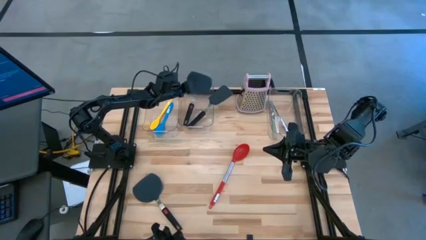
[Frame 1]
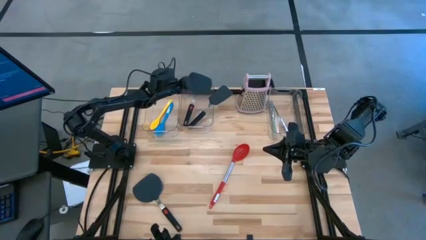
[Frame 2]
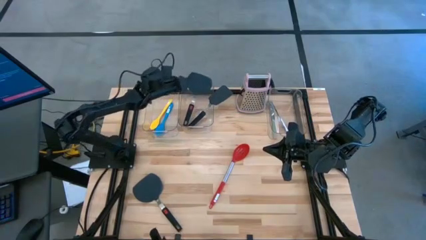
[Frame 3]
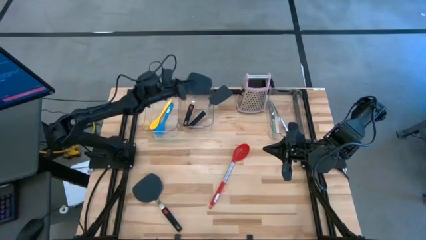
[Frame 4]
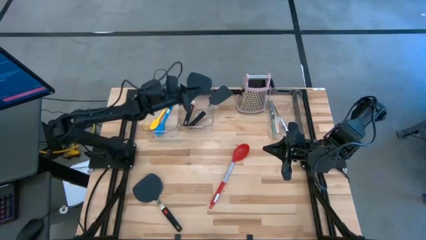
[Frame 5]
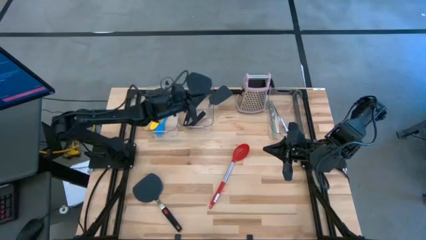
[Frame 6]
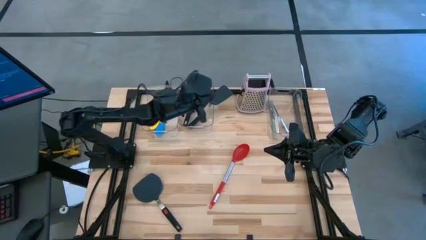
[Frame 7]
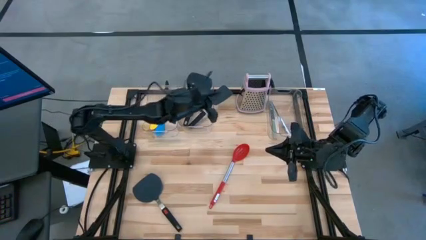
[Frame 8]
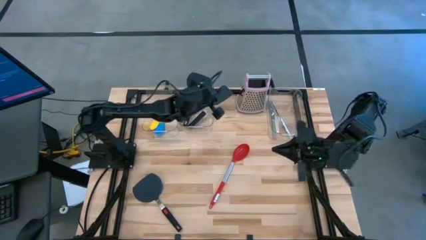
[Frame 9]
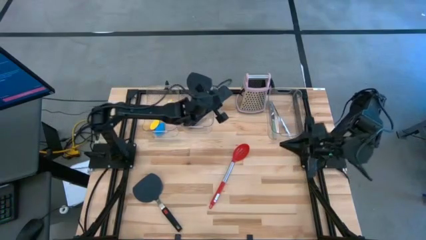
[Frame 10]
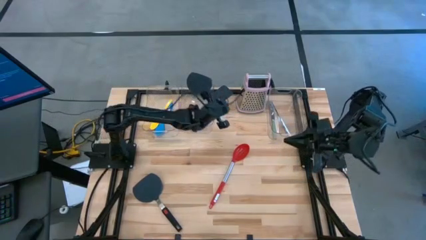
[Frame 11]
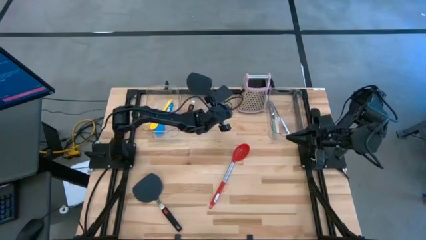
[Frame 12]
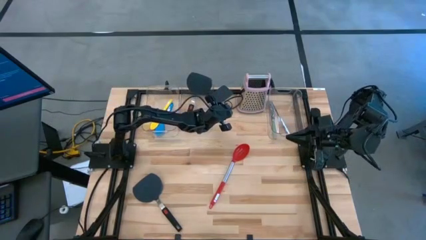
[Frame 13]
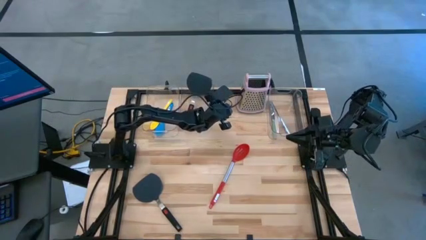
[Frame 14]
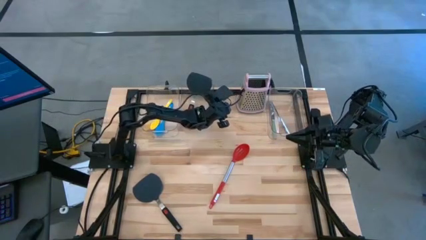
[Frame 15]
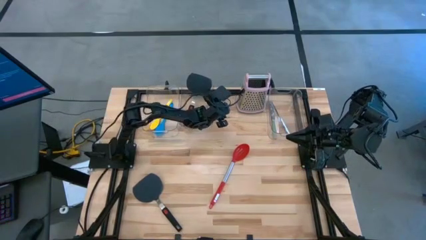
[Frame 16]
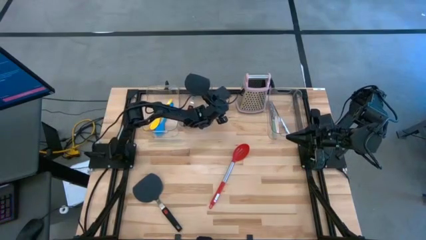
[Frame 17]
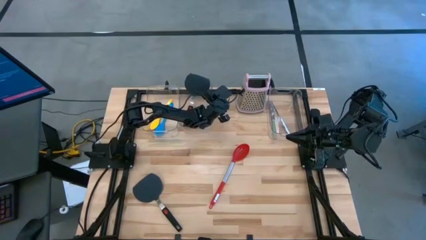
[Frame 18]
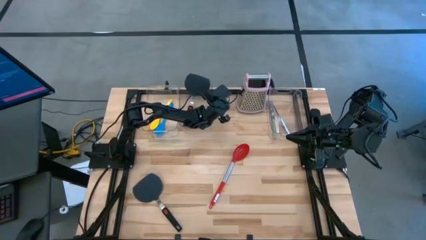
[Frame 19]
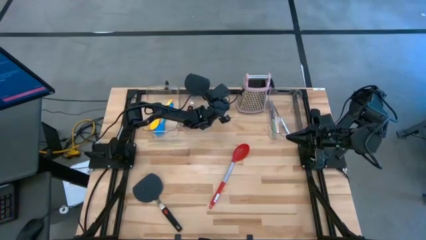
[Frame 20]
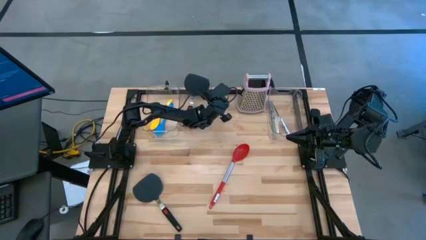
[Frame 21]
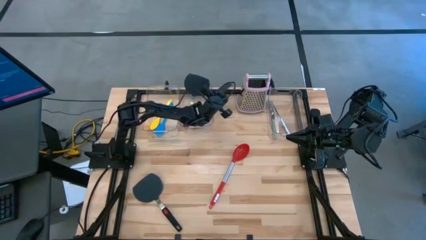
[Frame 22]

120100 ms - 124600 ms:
Task: Pick & Place Kitchen Items
Adjust the black spatula in the middle transparent bin

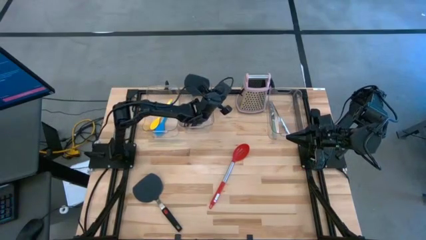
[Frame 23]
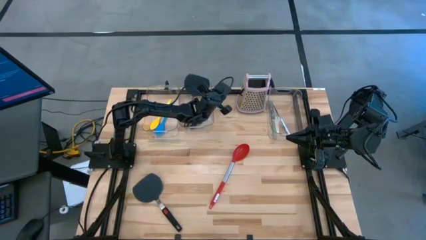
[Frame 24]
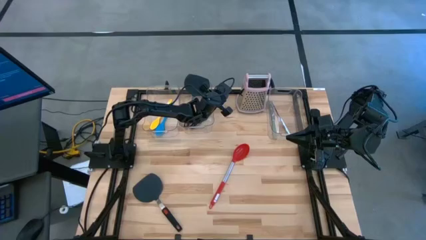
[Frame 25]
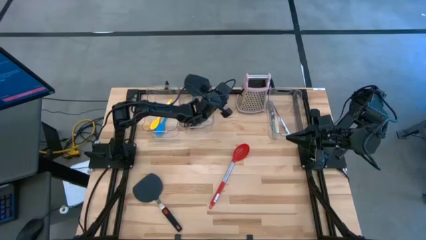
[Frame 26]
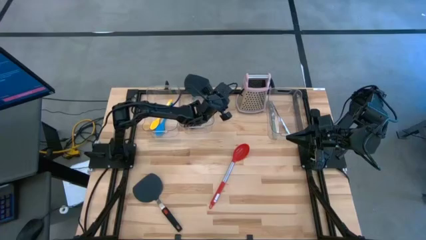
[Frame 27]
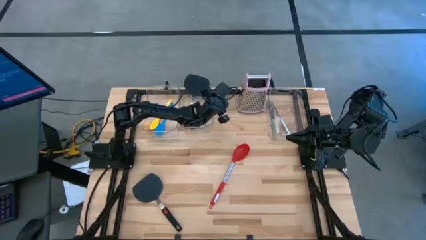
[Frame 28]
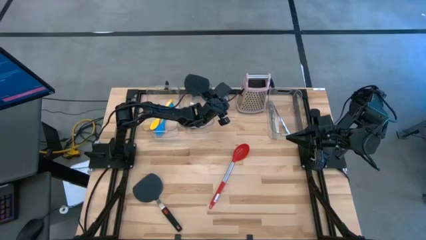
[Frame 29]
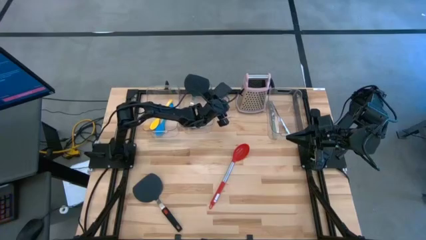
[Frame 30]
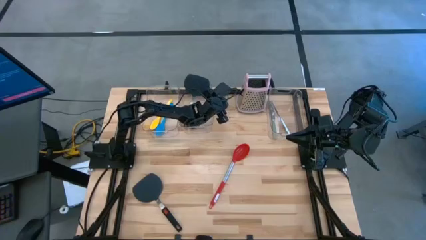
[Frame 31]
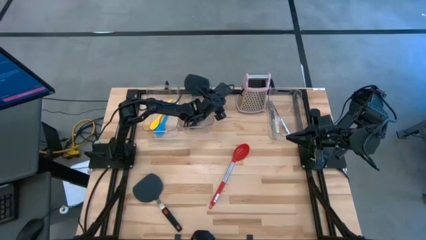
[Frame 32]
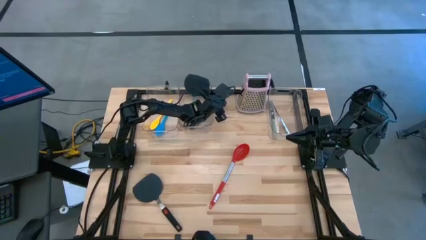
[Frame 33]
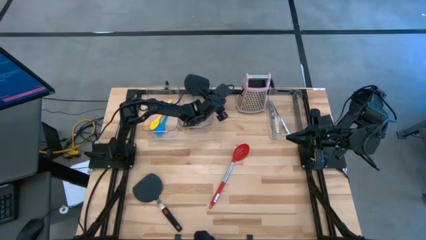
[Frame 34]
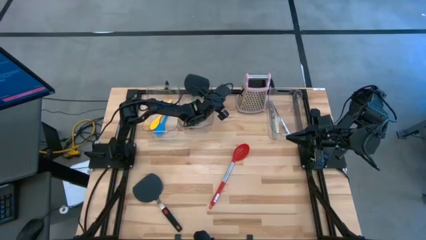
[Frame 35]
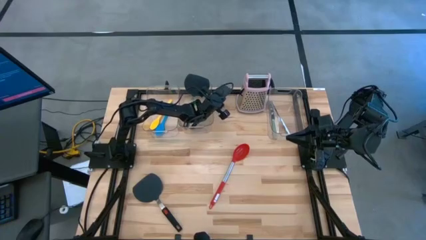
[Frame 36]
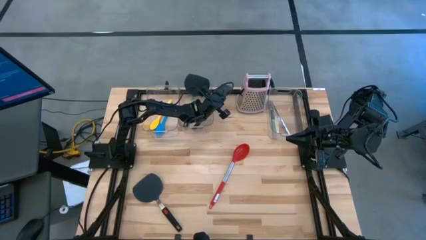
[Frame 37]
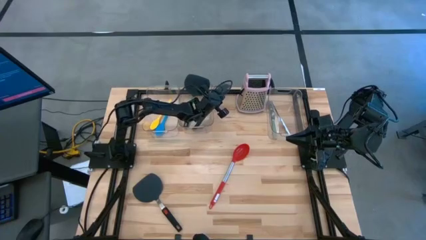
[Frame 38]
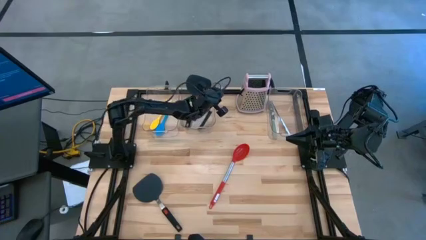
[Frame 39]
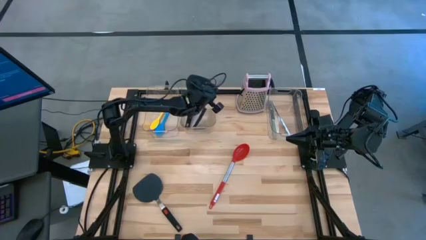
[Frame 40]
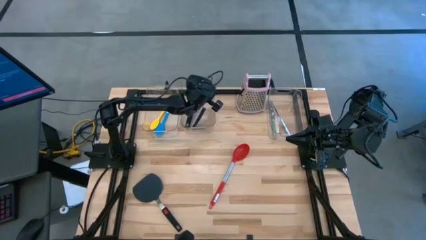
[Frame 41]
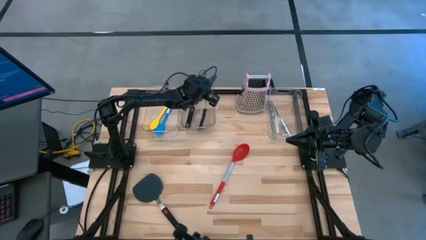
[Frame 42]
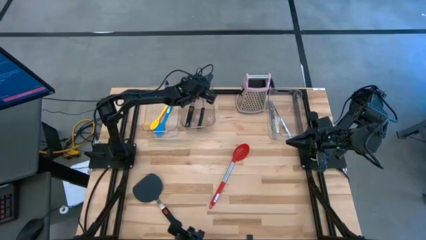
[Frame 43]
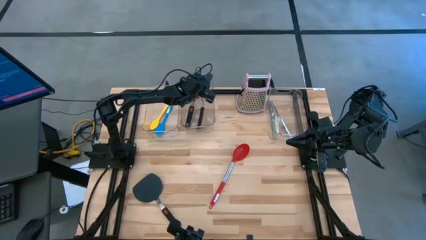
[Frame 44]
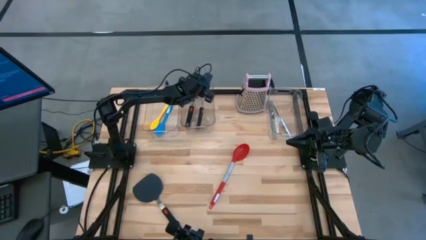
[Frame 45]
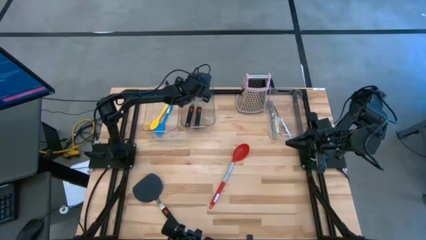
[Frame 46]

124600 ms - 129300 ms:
Adjust the black spatula in the middle transparent bin

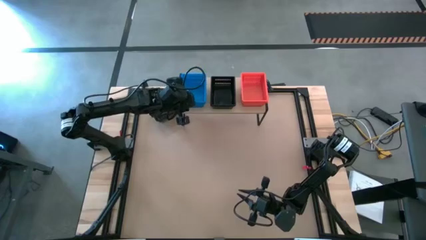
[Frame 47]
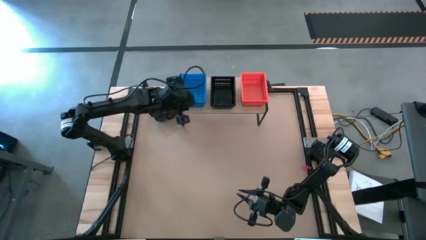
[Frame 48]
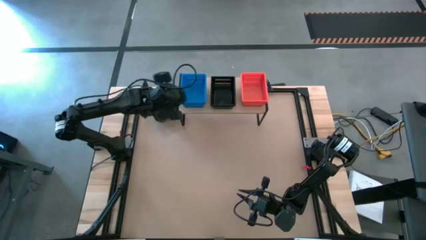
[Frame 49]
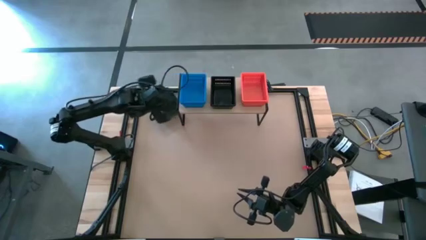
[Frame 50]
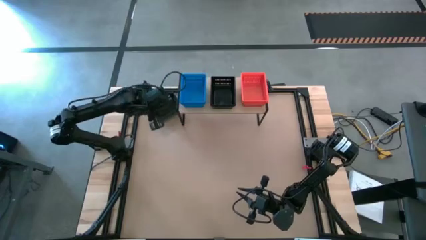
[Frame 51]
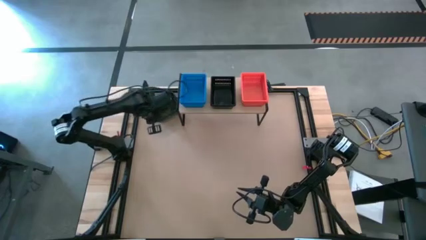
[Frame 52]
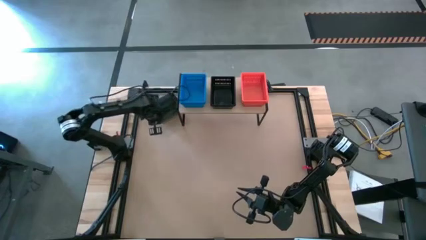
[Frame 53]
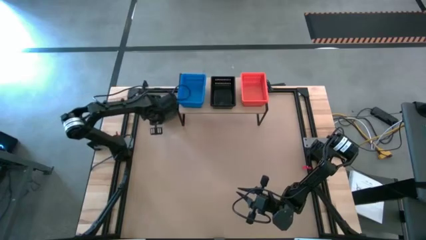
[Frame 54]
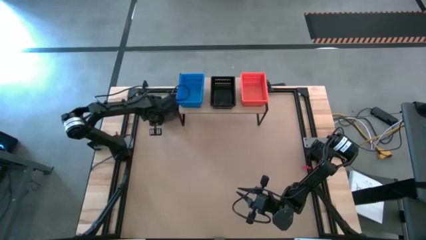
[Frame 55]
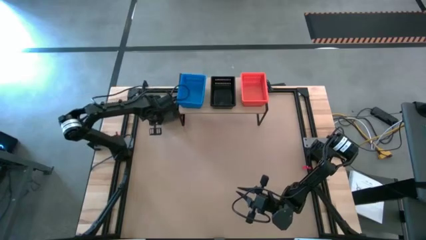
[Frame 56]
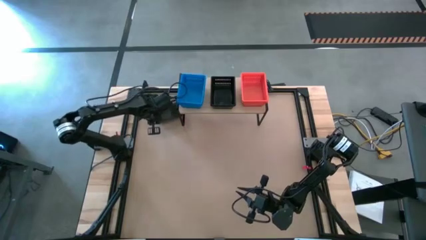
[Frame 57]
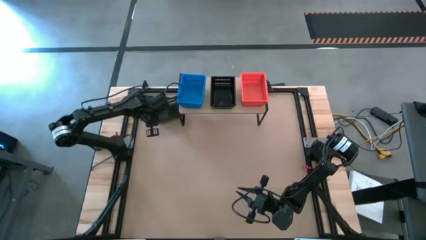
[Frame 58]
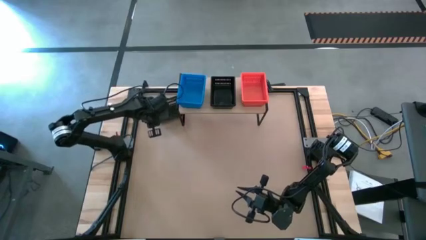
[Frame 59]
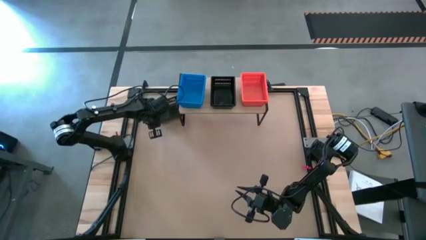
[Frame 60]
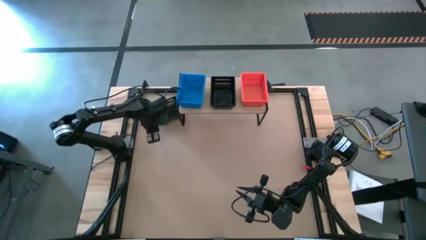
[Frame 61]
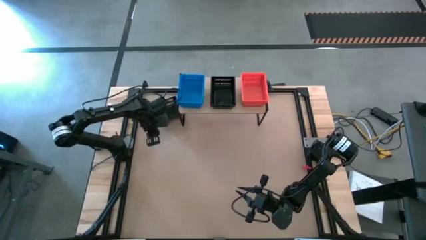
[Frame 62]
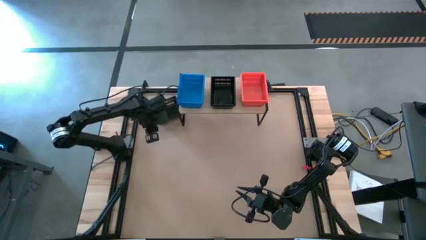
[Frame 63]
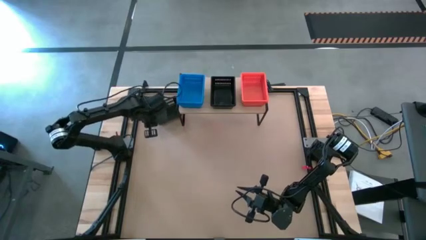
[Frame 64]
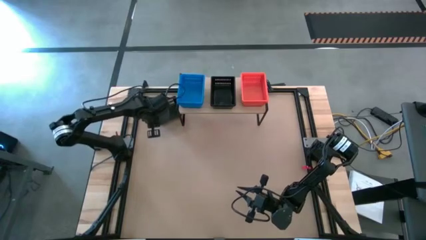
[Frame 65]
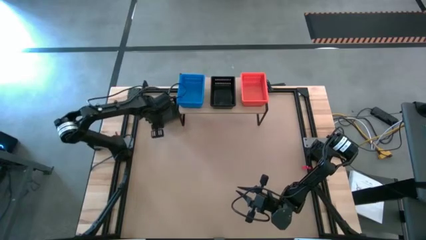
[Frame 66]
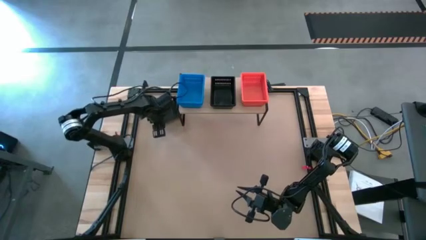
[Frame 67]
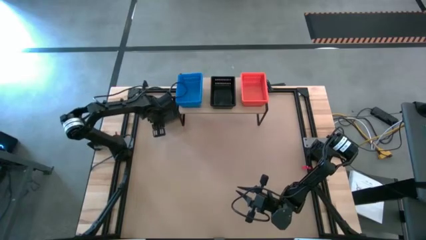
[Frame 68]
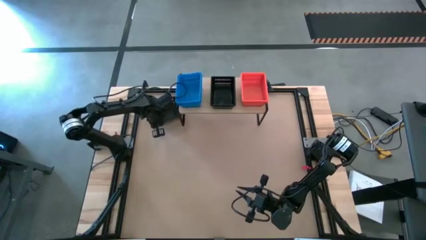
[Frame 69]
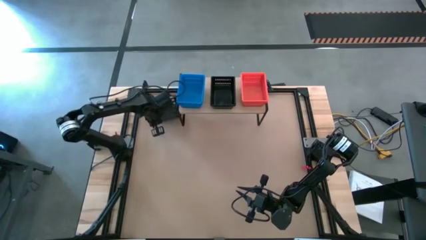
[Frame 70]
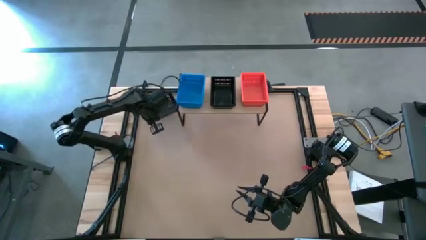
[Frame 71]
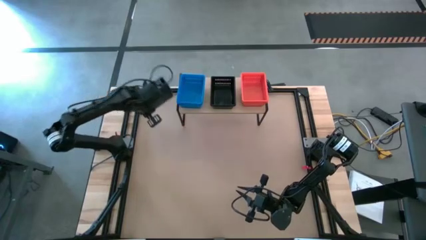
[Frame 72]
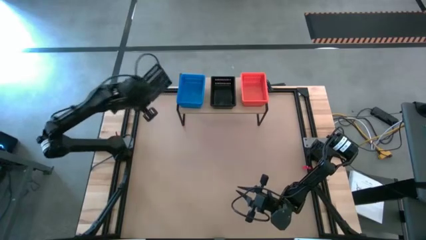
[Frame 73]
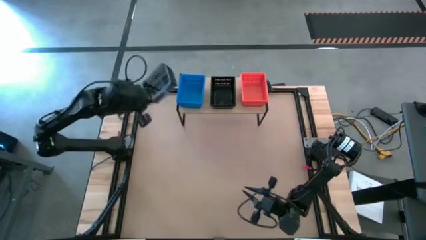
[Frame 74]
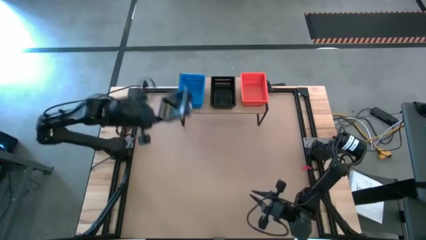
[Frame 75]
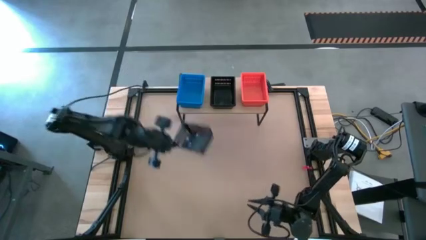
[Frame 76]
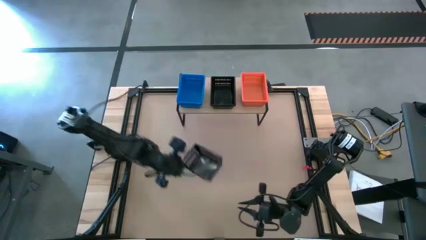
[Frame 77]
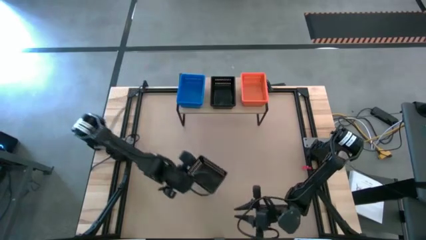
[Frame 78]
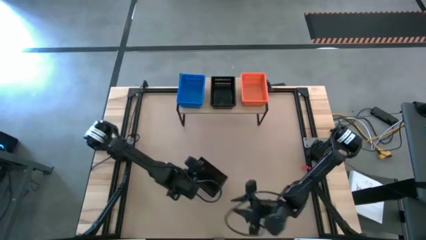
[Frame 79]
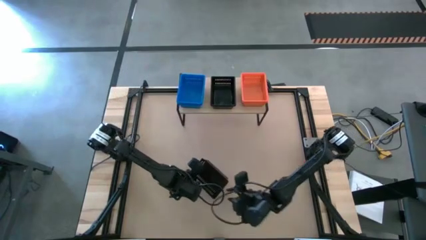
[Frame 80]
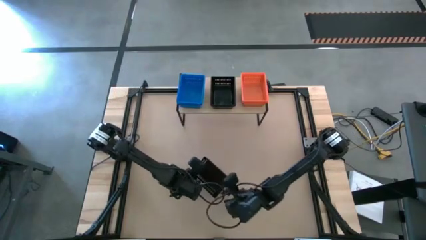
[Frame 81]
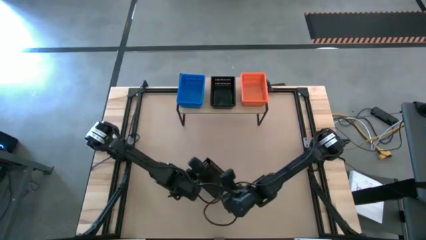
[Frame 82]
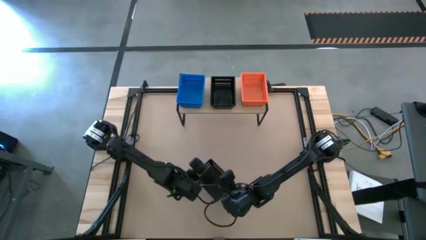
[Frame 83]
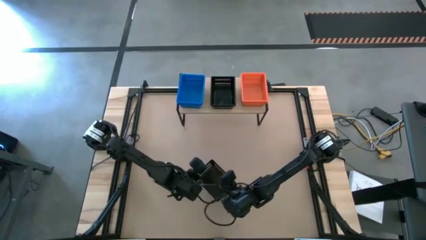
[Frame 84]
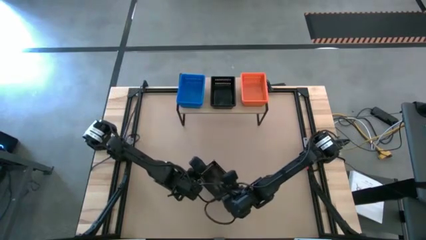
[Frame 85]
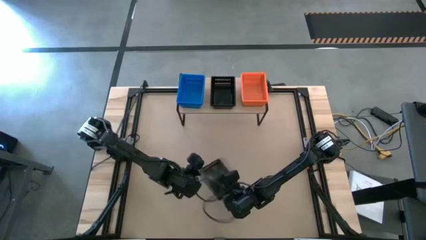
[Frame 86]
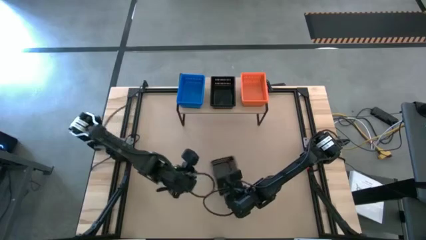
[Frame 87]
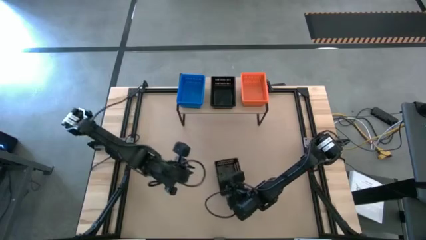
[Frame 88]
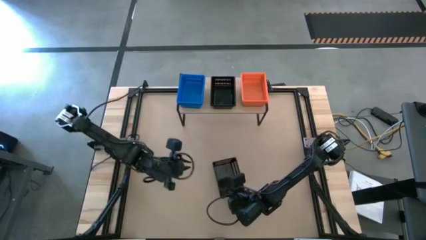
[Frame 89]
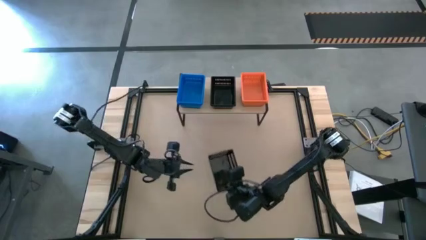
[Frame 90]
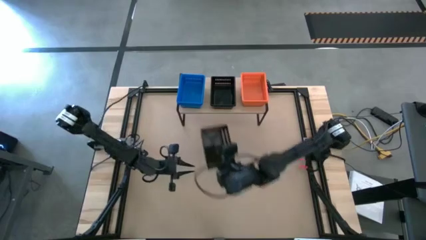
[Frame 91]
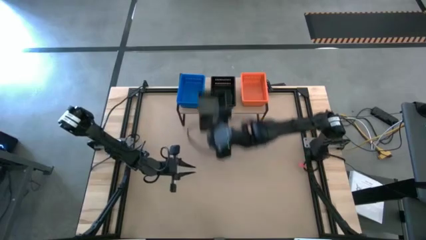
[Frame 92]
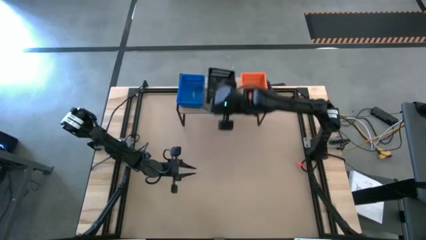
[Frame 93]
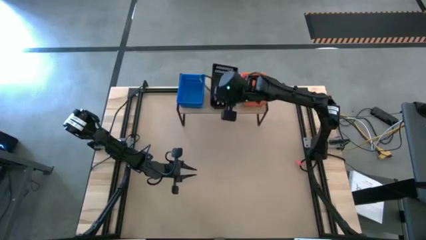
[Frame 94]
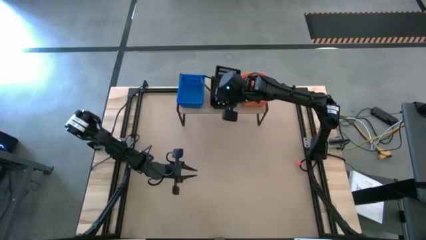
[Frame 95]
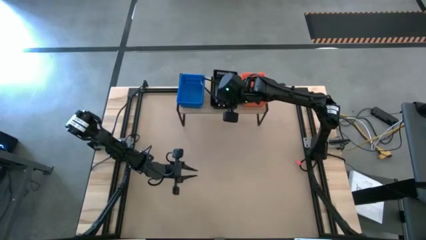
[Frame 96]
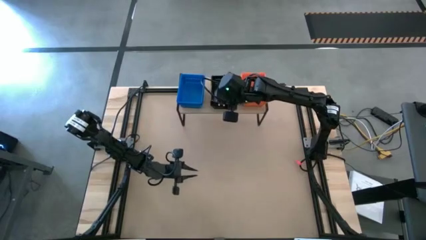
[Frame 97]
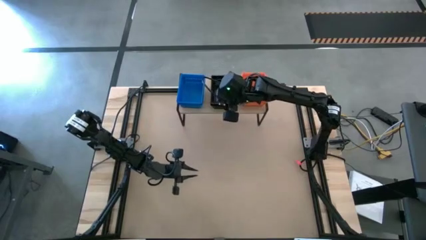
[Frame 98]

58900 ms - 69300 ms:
Task: Stack baskets on shelf by color
Stack the black basket on the black basket on the shelf
